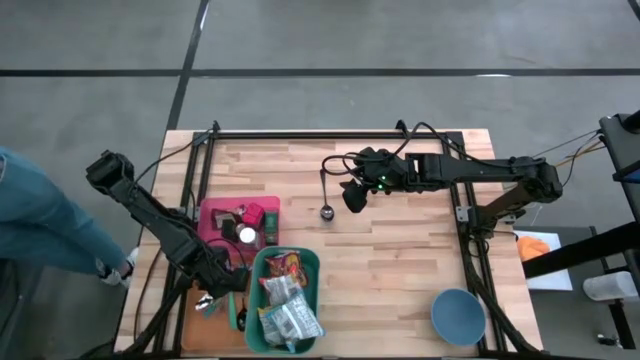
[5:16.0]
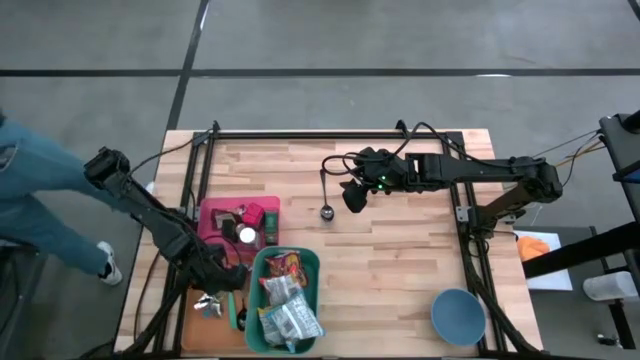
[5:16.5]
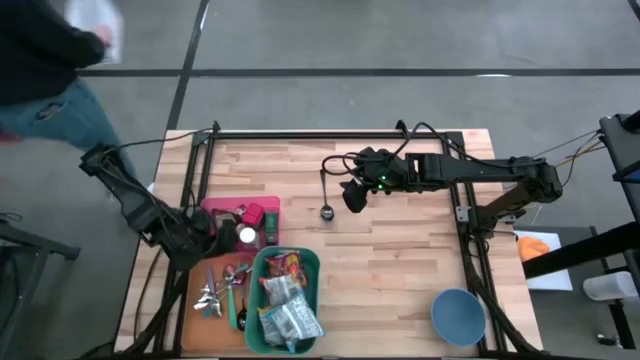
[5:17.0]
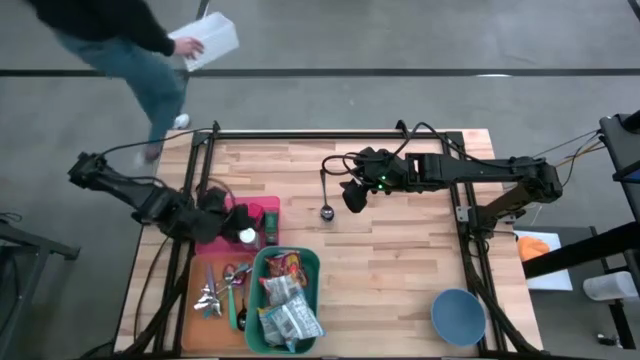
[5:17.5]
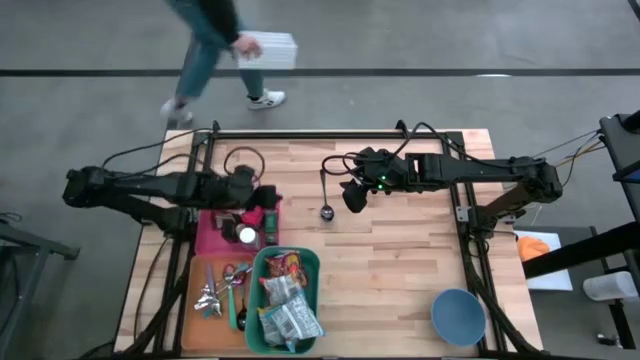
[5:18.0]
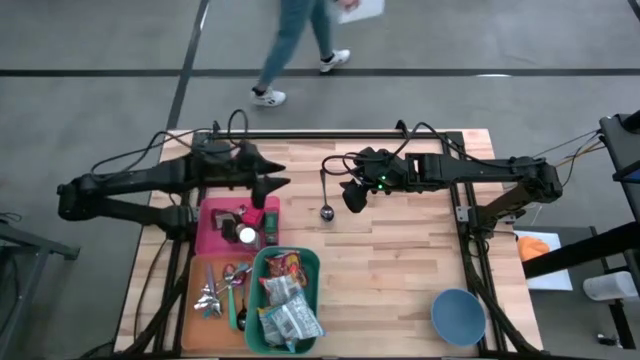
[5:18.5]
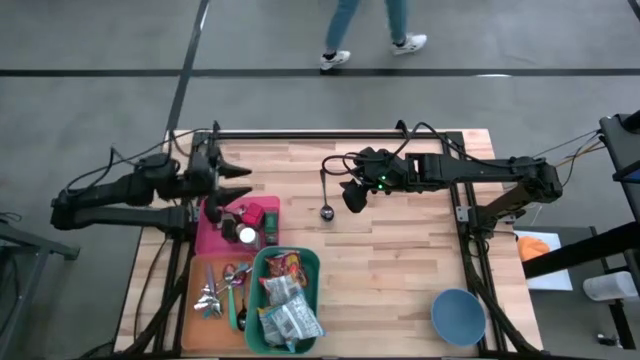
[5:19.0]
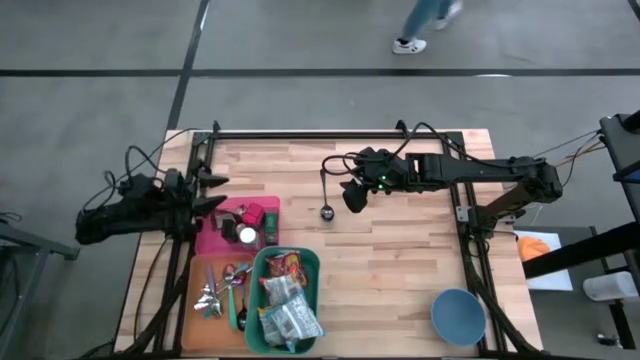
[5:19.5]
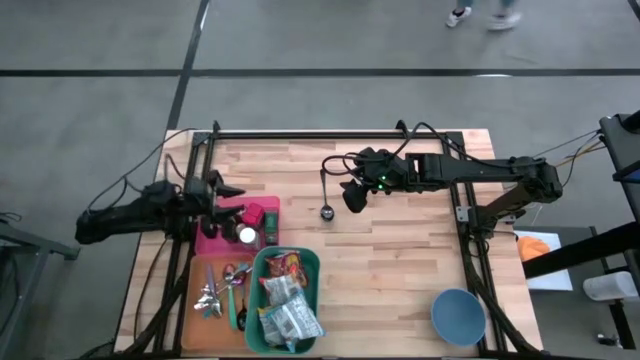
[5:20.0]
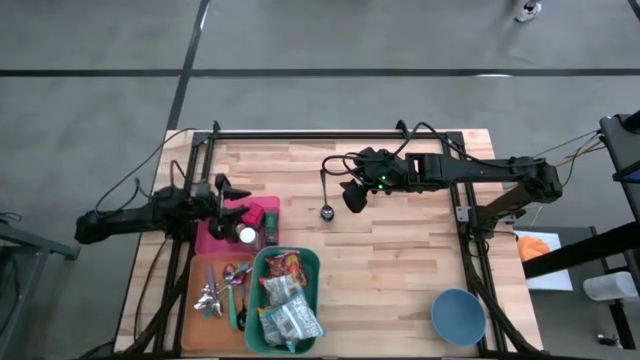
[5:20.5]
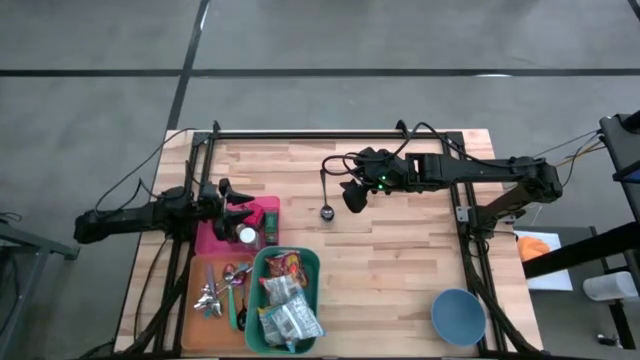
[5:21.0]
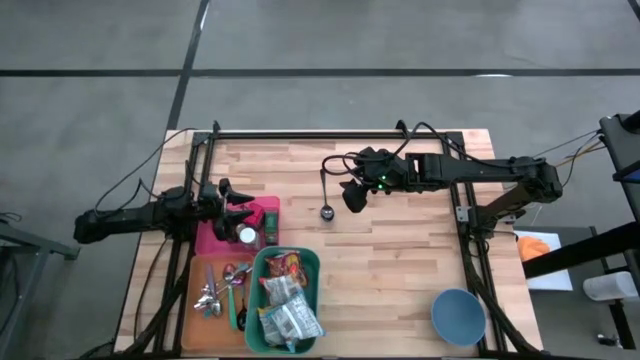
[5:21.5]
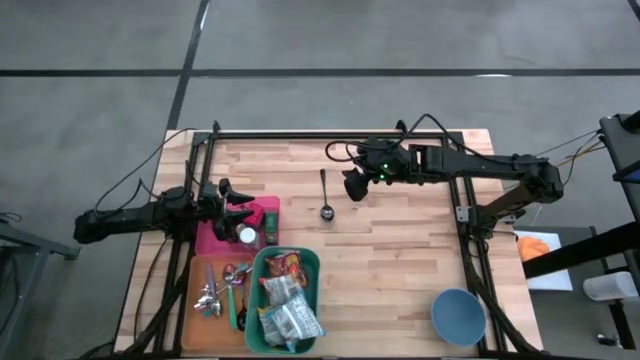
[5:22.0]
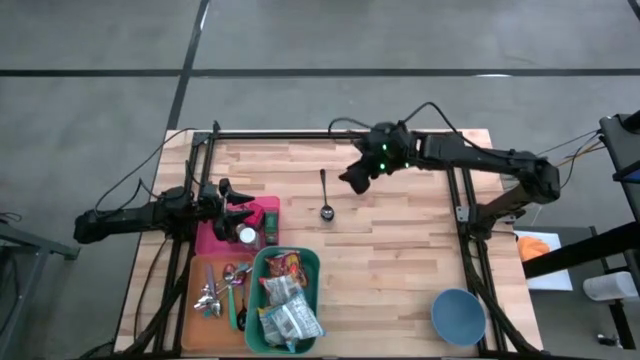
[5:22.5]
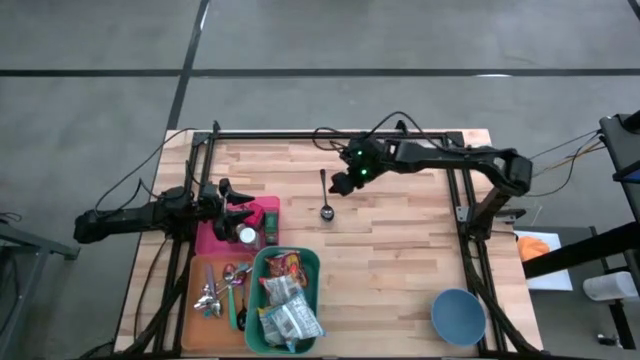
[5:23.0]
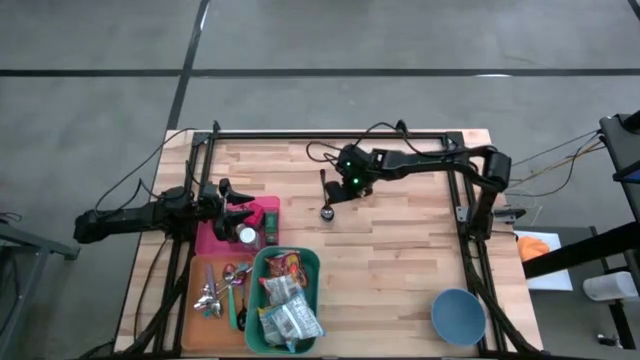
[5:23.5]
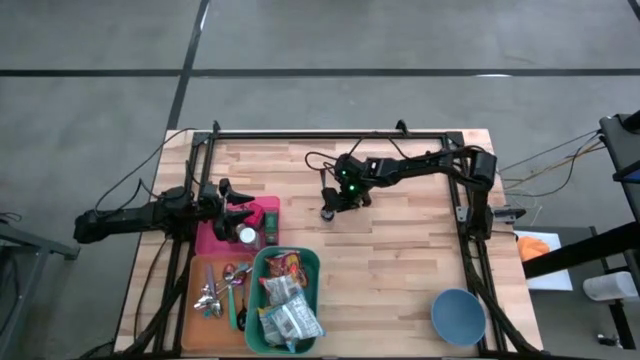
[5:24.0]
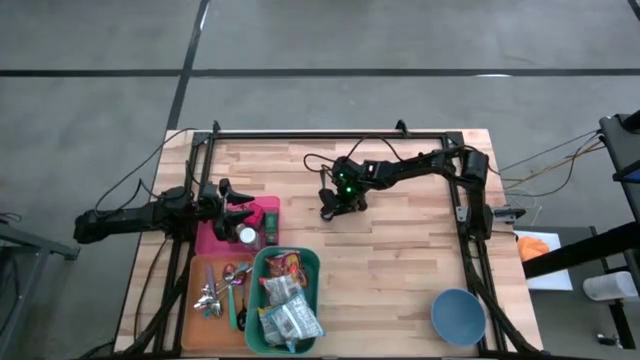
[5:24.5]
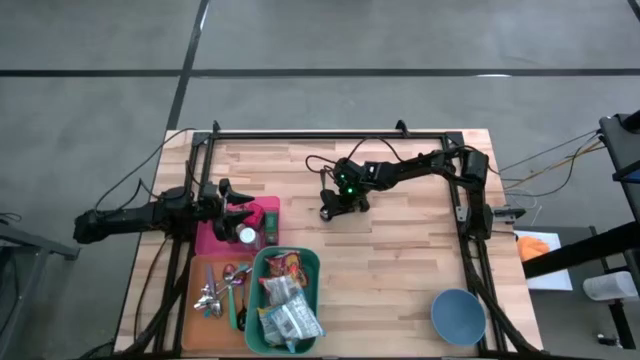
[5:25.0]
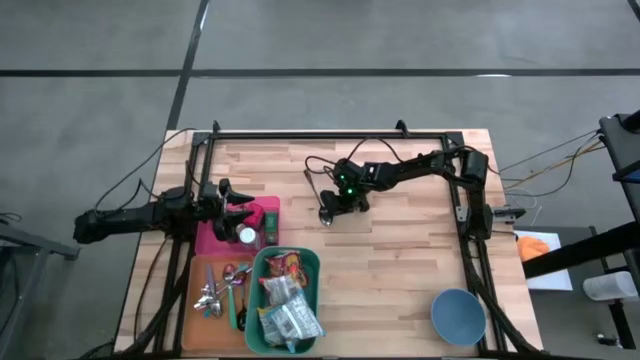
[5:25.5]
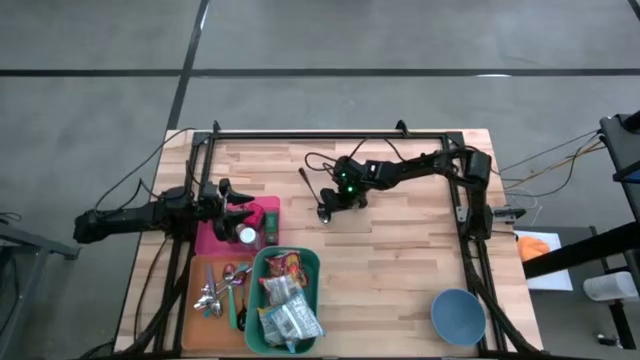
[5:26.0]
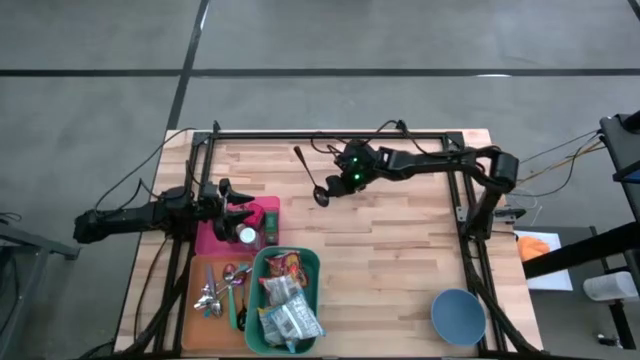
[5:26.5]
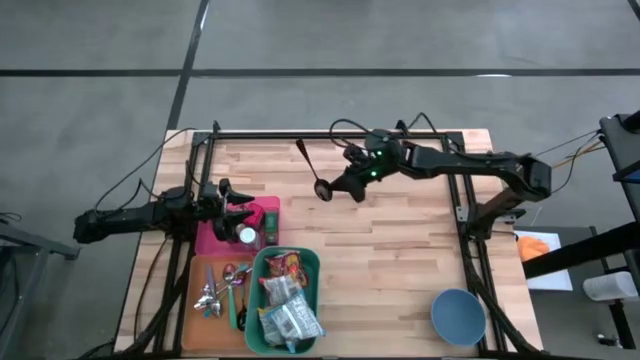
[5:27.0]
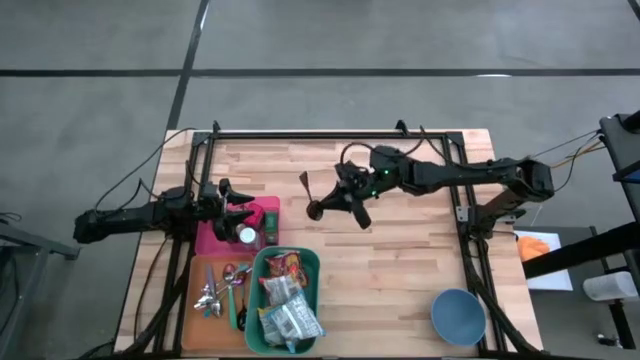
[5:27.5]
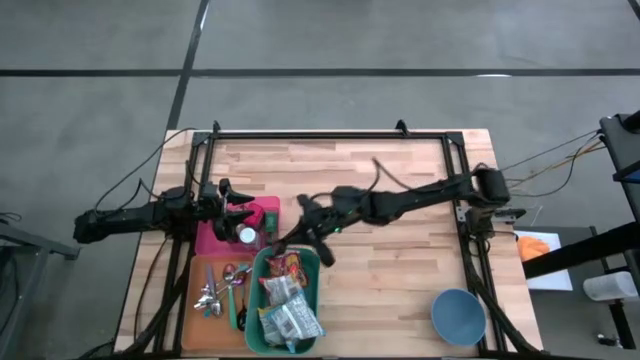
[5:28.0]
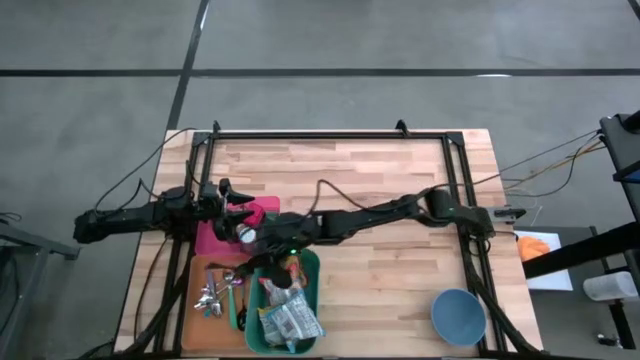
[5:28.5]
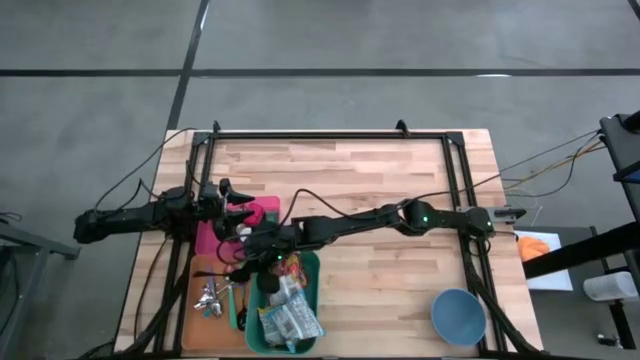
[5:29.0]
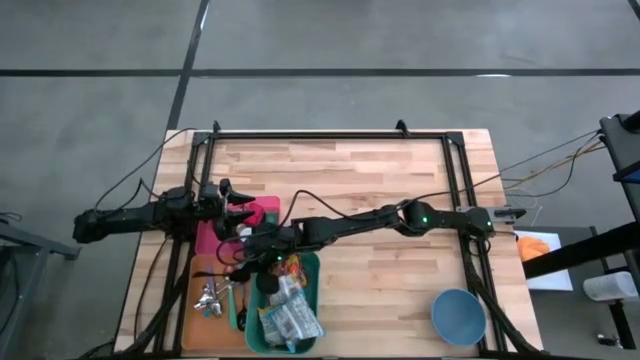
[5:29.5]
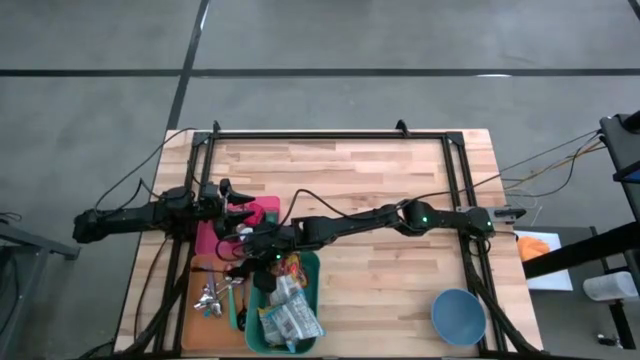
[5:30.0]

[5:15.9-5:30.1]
Put the black spoon into the orange bin
